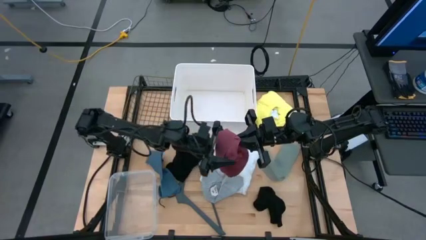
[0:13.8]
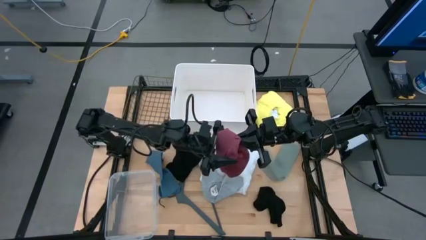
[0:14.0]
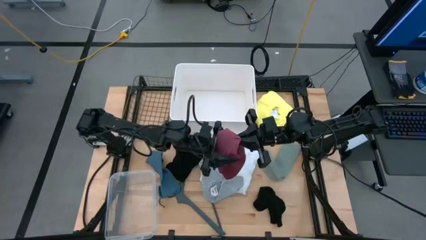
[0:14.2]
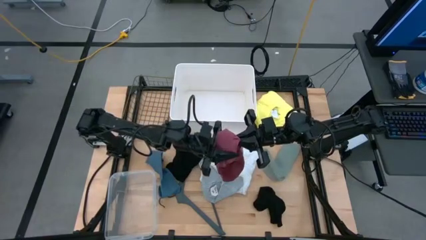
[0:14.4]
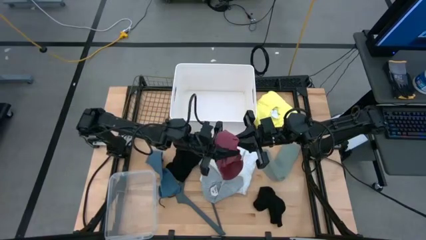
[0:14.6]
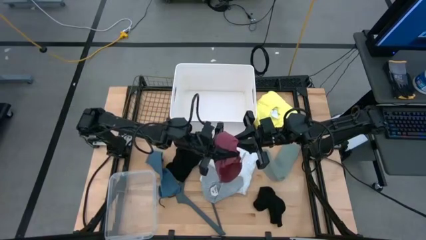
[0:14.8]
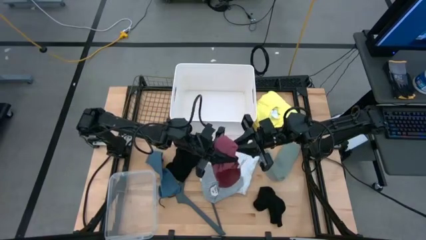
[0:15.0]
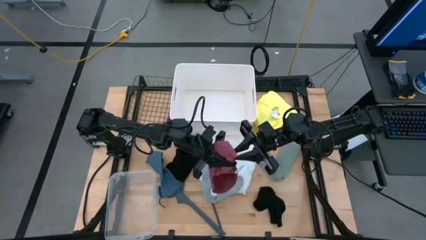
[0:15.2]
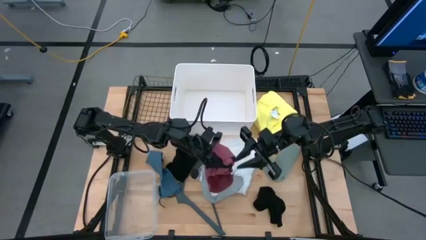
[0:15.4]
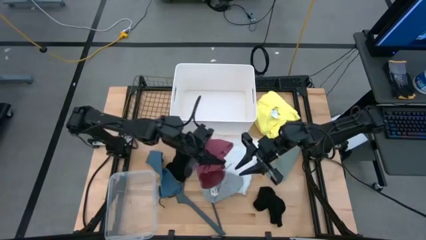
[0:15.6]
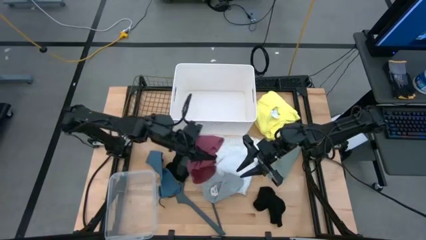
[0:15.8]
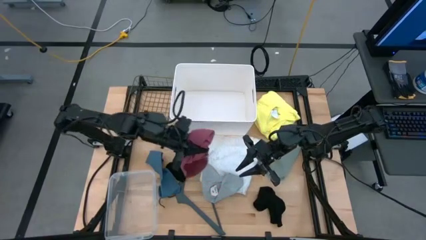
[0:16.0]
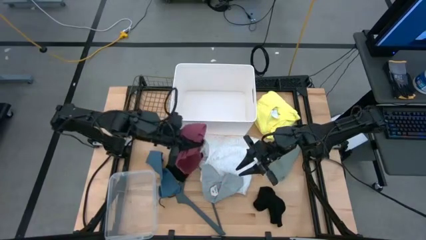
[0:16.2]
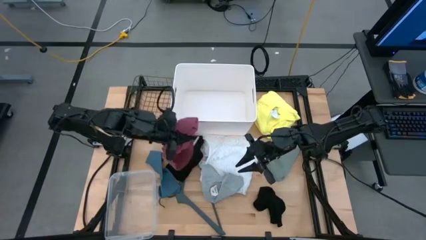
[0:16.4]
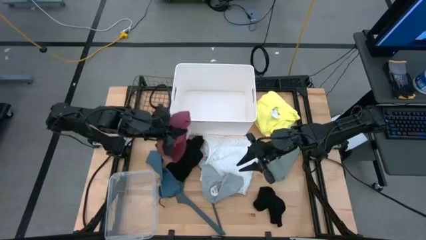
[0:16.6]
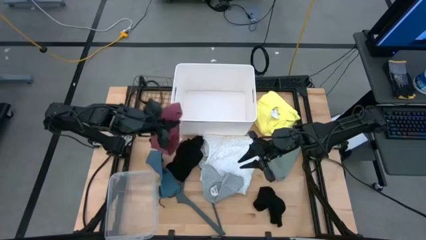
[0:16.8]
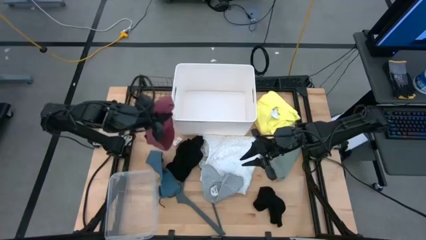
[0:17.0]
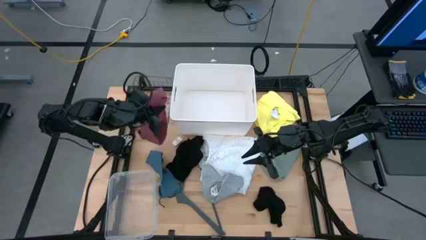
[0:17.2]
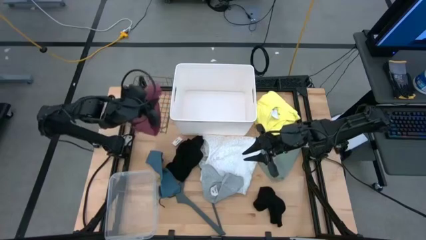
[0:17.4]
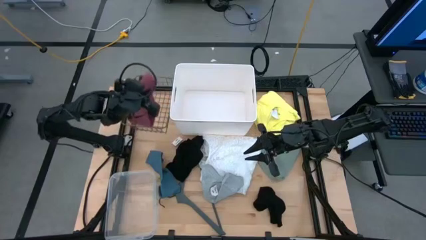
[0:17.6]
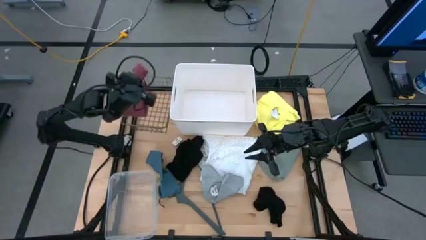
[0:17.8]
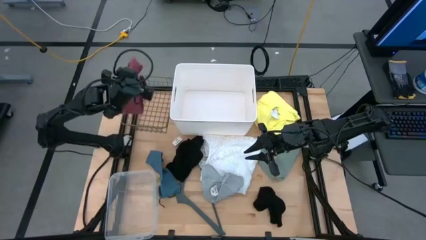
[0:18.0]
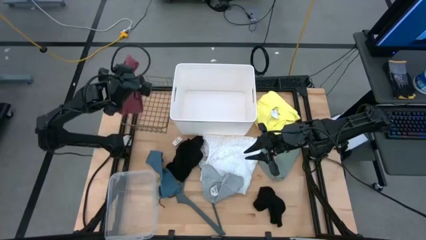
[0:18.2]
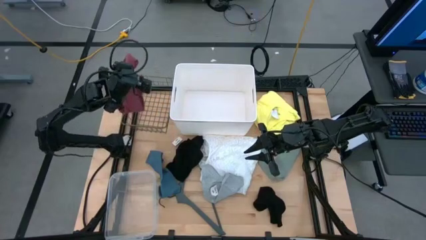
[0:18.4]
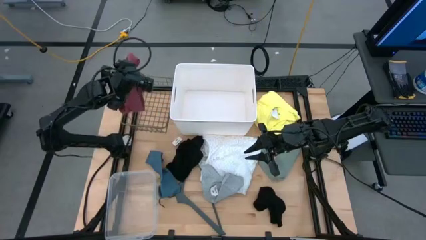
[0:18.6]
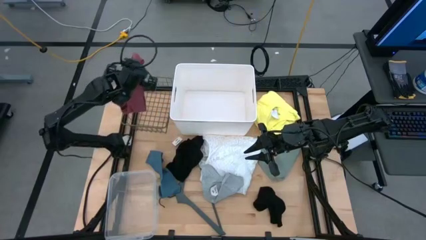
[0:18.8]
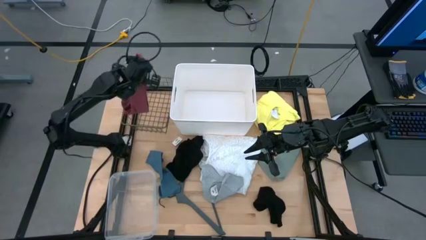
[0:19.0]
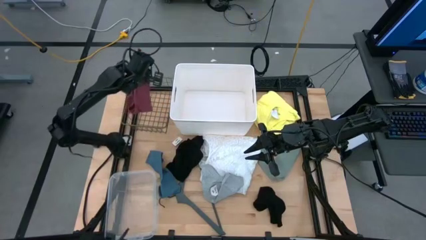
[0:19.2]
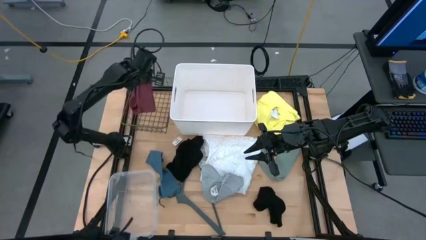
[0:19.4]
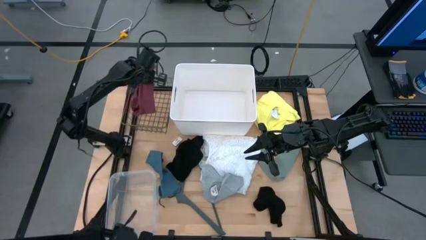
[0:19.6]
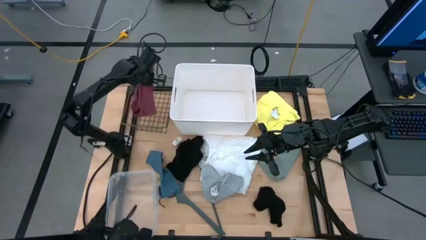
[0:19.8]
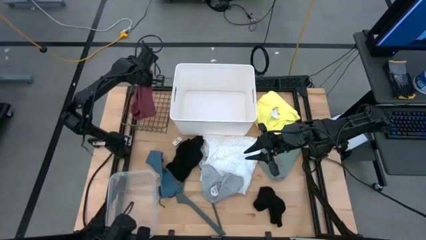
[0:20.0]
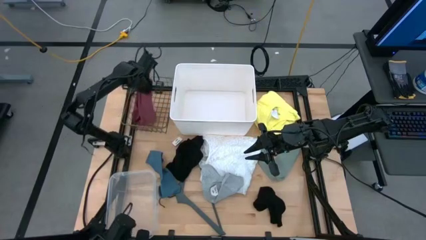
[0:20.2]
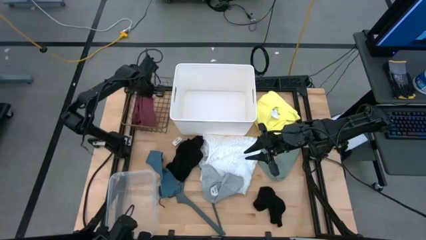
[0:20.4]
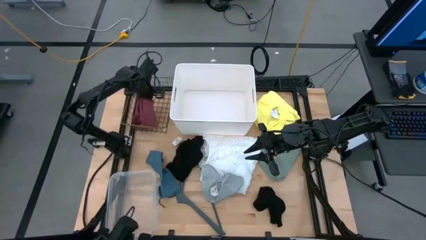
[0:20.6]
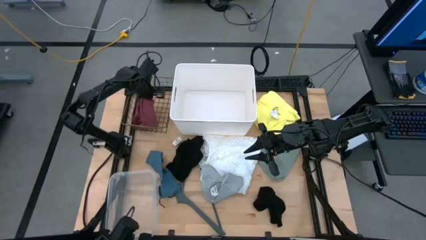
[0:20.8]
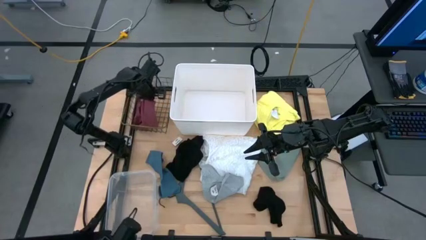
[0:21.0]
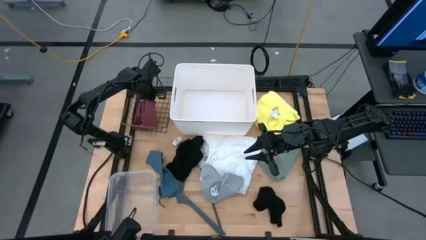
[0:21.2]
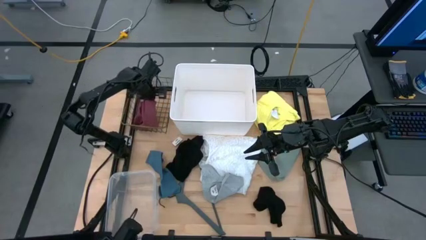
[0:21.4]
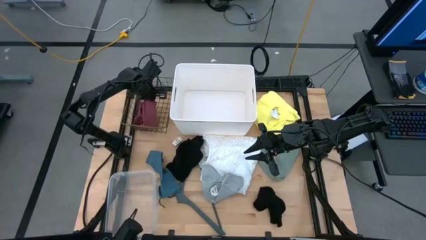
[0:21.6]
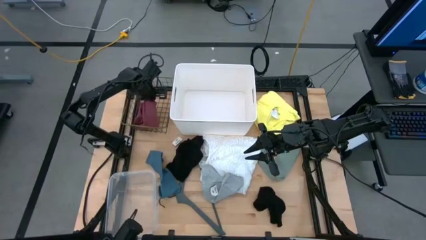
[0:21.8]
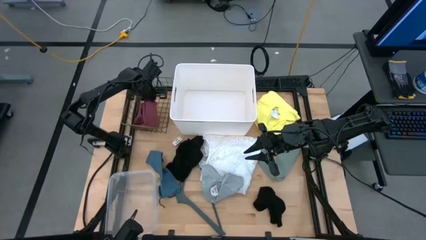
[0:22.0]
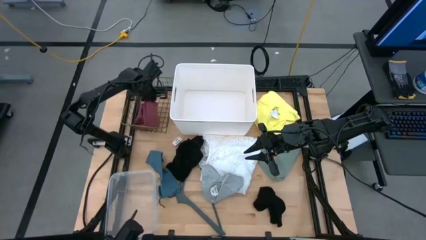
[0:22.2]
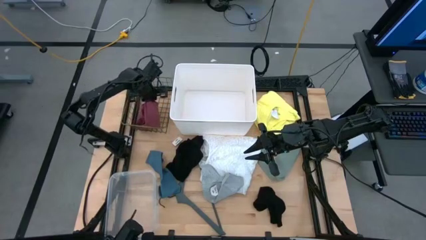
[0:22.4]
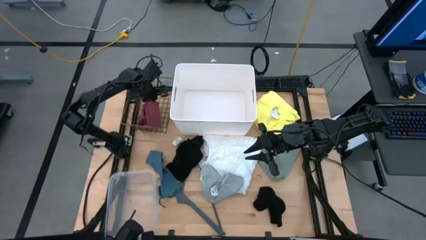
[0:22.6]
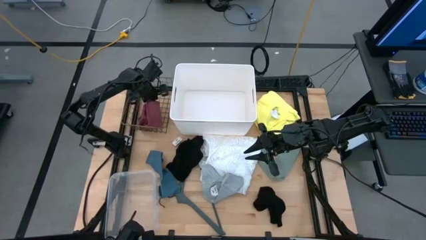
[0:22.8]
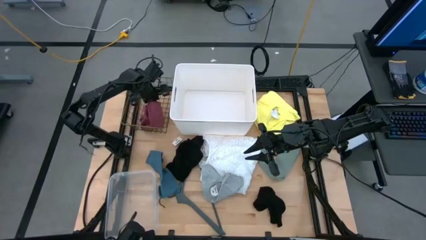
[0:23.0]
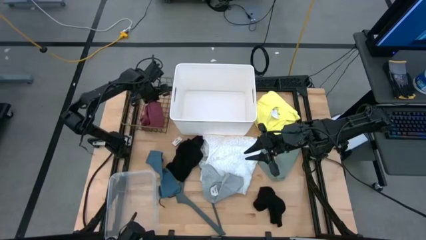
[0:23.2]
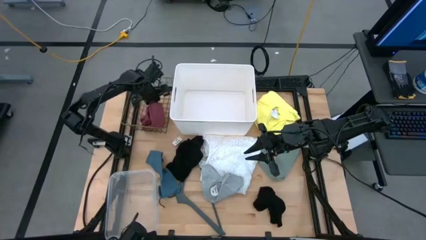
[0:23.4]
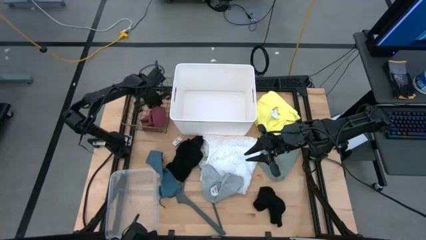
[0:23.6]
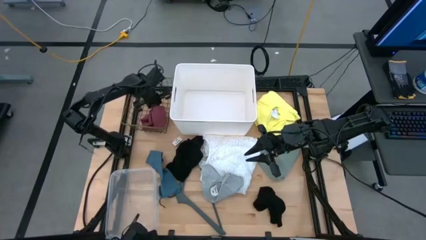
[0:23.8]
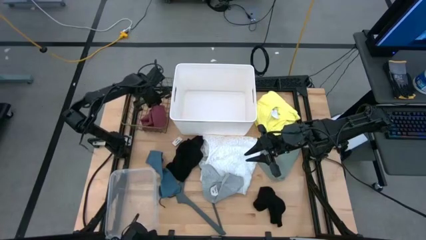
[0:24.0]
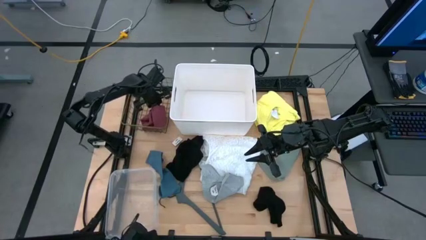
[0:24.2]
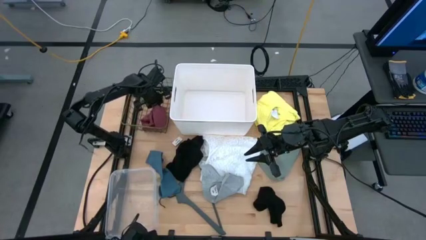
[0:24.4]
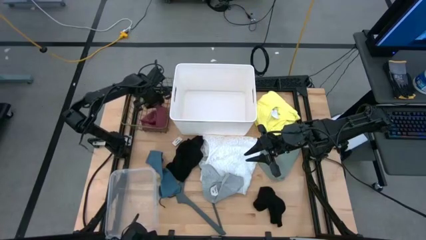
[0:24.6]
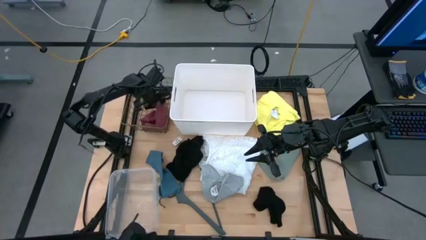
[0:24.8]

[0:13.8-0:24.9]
Task: Pick & Place Cloths
Put the red underwear into the brown basket

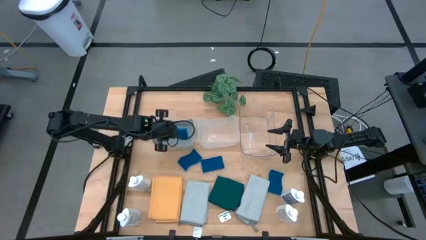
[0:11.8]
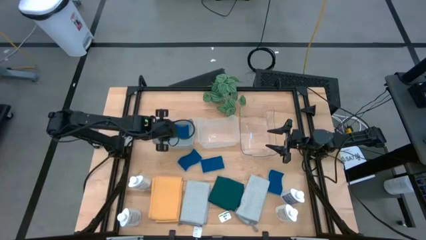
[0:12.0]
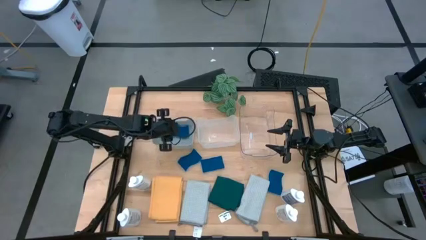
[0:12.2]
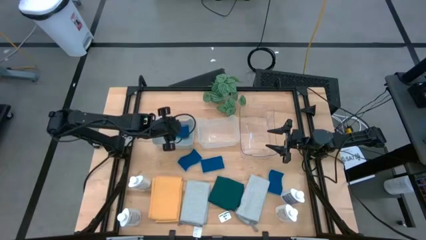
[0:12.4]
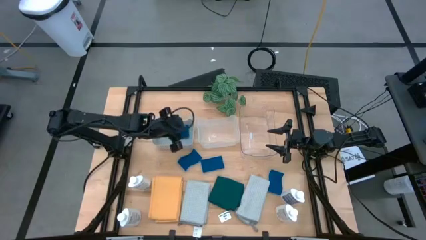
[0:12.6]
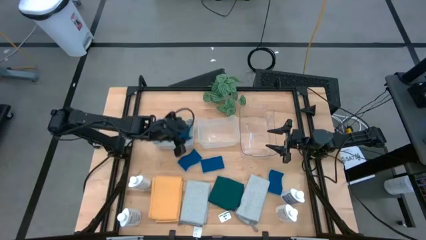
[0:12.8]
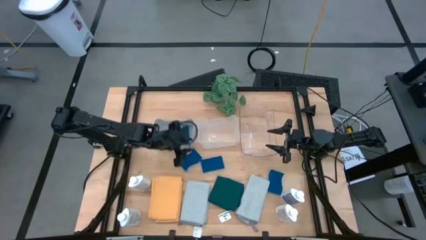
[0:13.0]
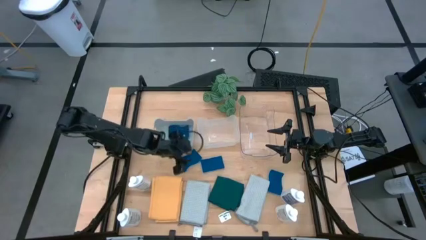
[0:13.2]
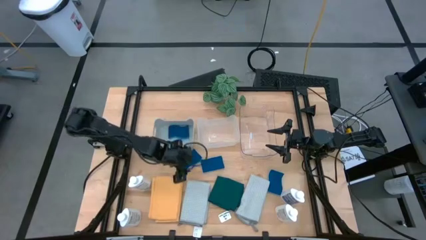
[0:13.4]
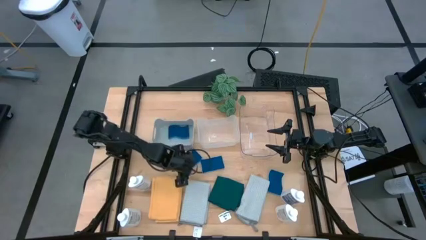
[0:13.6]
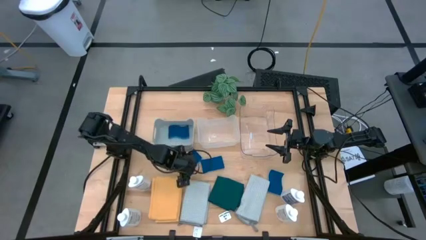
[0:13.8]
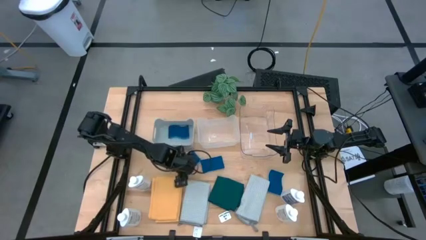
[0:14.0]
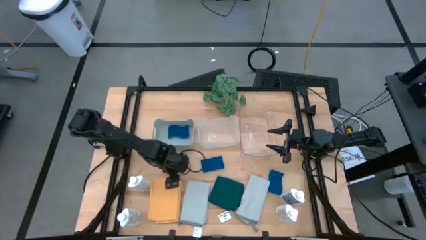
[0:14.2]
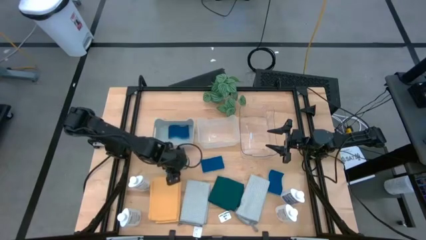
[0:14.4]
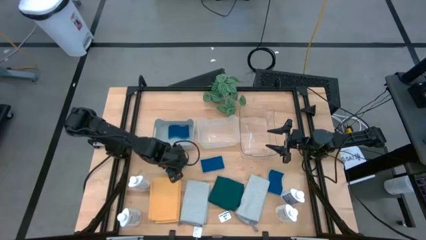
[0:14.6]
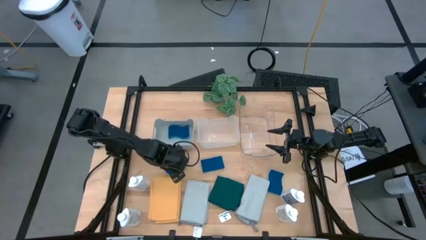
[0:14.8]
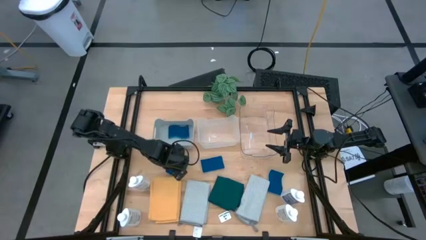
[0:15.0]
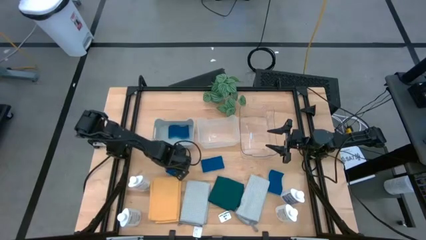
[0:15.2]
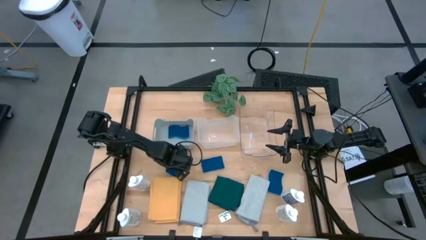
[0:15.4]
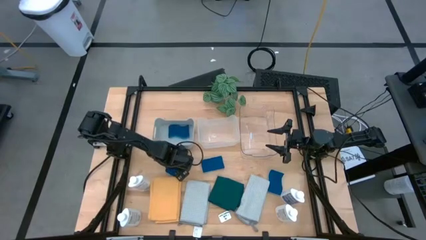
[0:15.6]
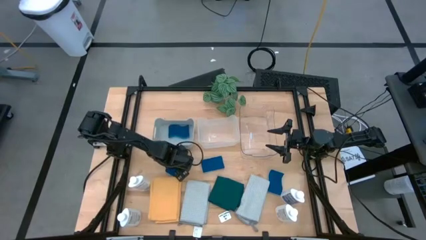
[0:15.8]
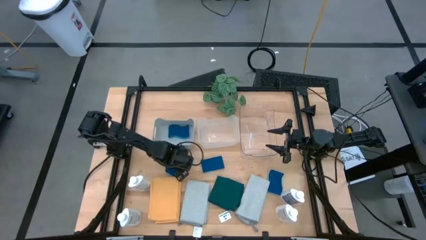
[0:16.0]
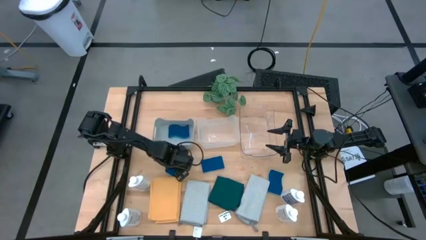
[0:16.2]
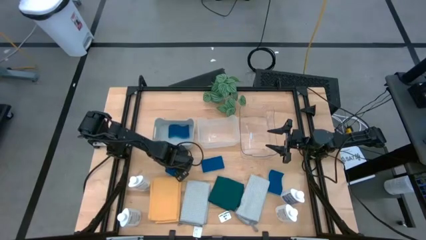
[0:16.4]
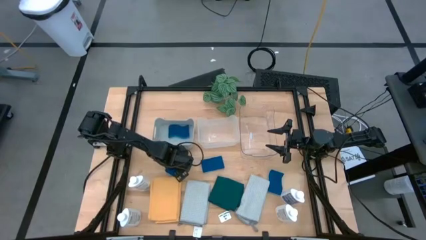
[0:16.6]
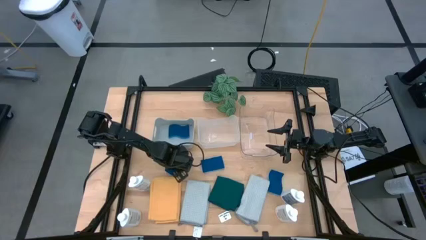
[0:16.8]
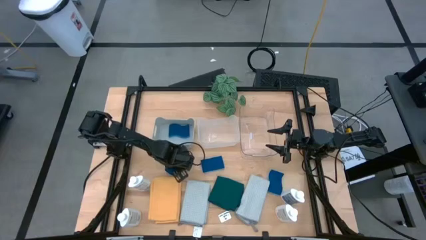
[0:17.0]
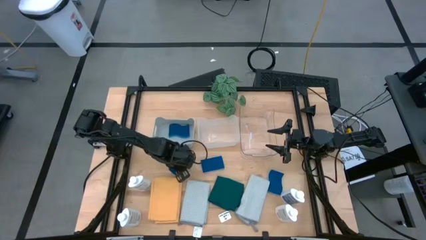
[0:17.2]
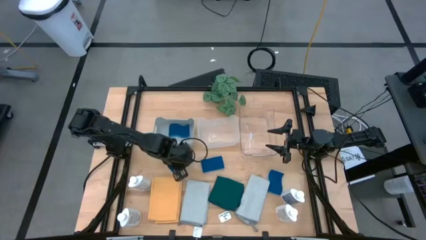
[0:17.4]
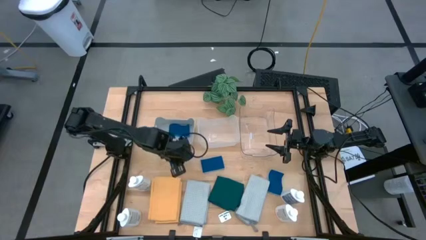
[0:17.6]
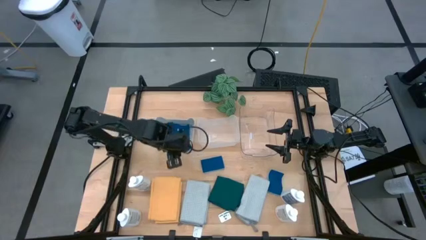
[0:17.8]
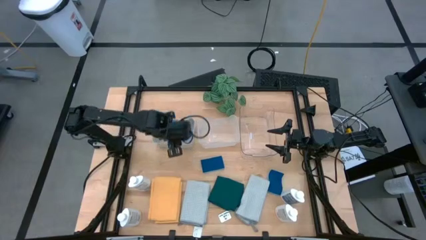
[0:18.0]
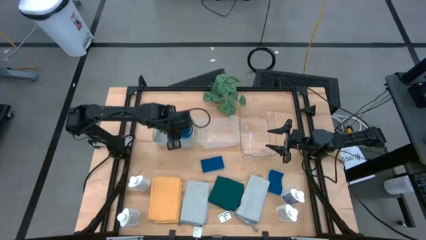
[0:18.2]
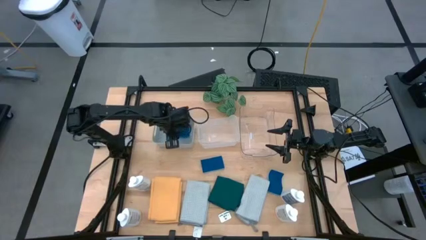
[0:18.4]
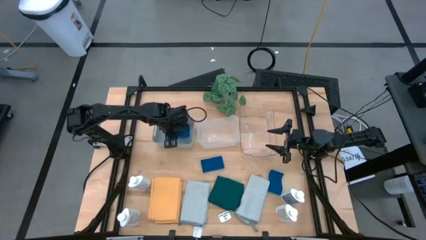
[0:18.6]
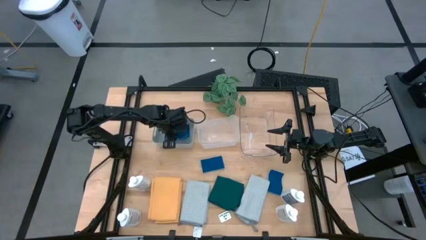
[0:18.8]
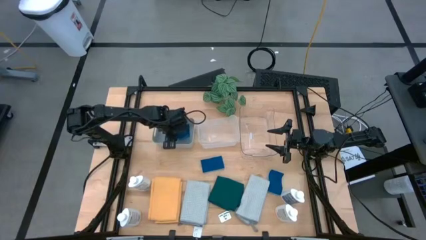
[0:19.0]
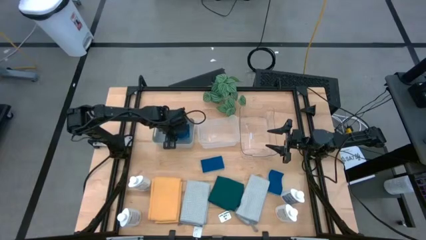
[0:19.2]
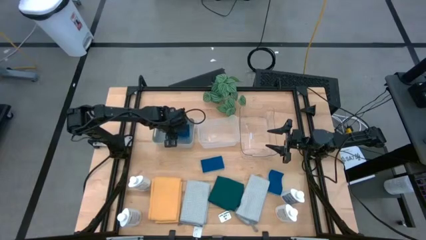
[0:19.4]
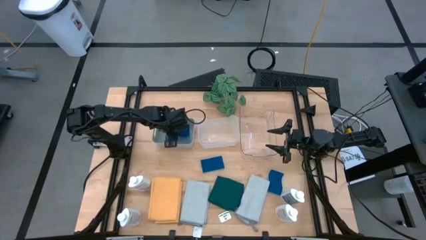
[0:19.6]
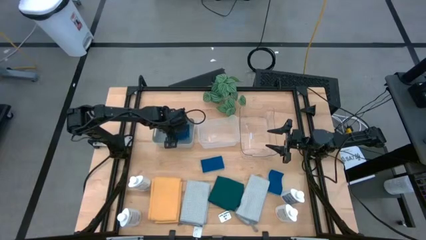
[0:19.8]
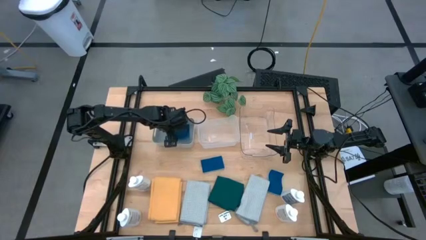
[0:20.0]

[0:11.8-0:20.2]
Task: Pick & Place Kitchen Items
Put the blue sponge into the gray bin
